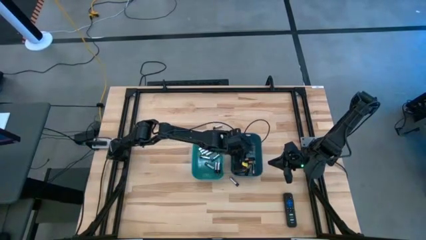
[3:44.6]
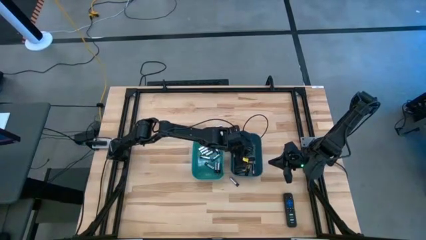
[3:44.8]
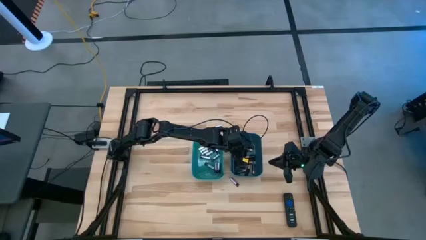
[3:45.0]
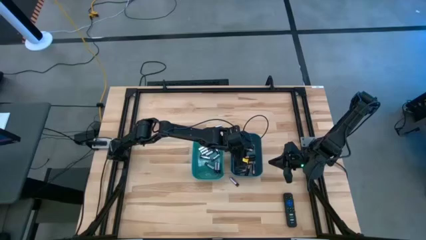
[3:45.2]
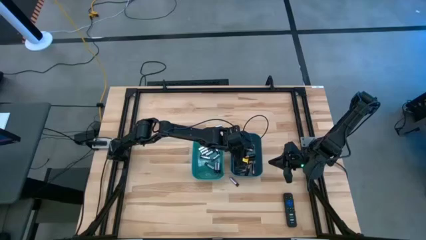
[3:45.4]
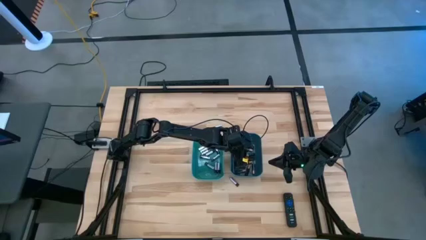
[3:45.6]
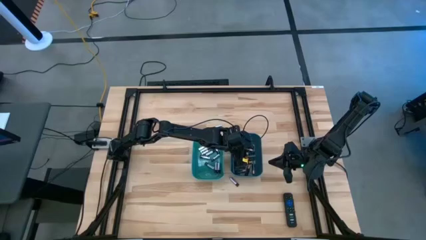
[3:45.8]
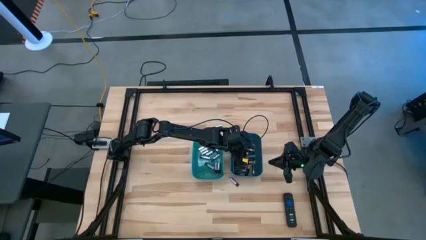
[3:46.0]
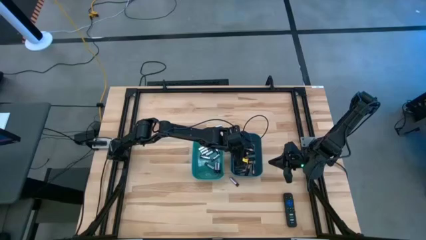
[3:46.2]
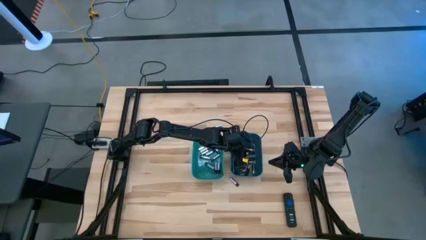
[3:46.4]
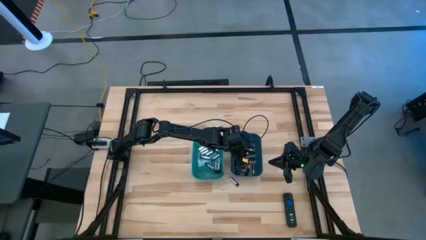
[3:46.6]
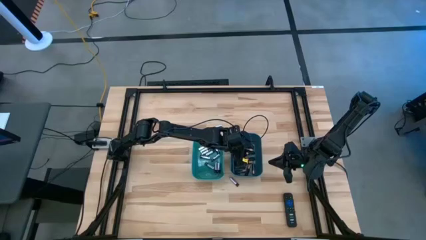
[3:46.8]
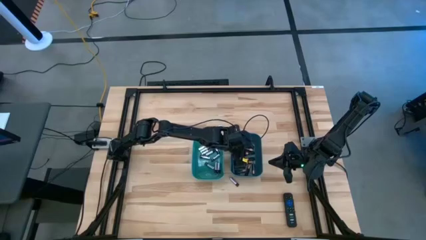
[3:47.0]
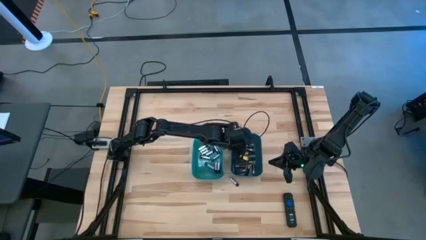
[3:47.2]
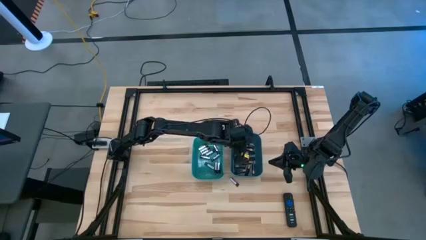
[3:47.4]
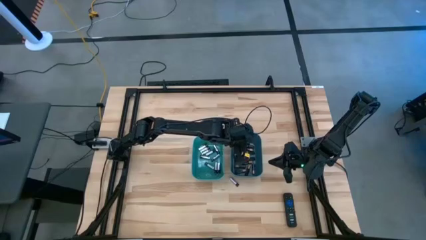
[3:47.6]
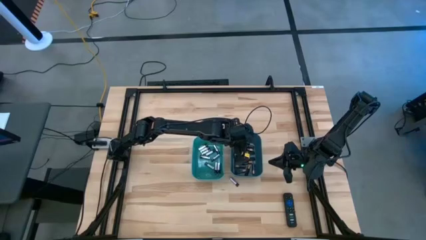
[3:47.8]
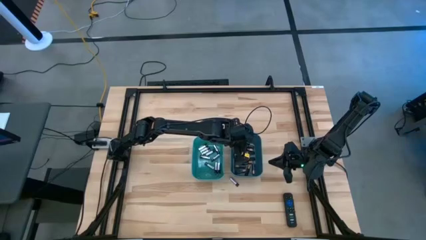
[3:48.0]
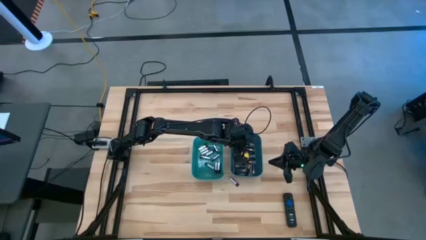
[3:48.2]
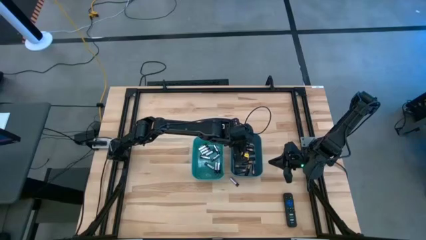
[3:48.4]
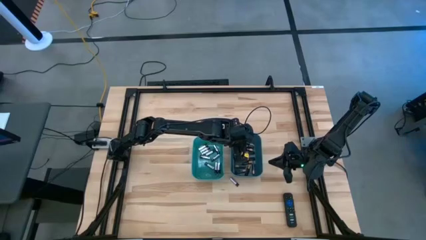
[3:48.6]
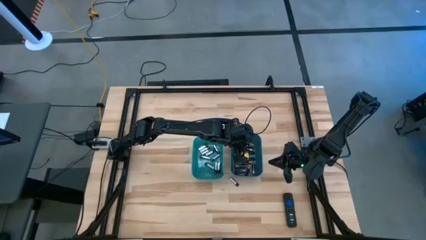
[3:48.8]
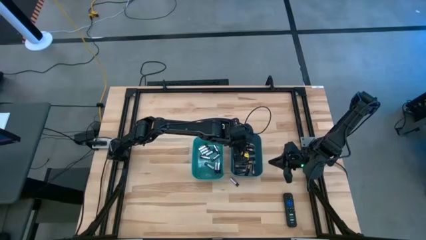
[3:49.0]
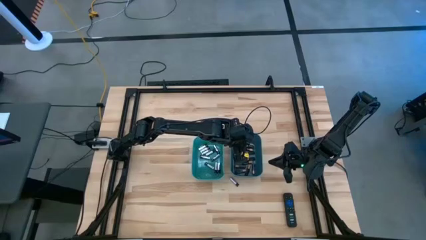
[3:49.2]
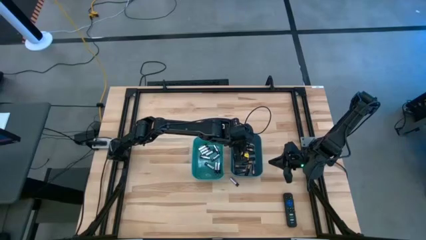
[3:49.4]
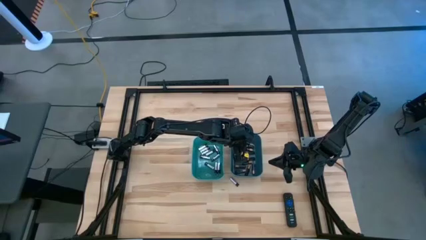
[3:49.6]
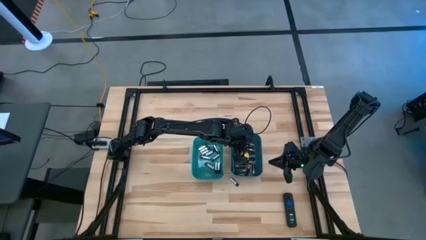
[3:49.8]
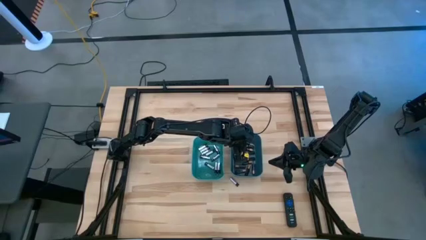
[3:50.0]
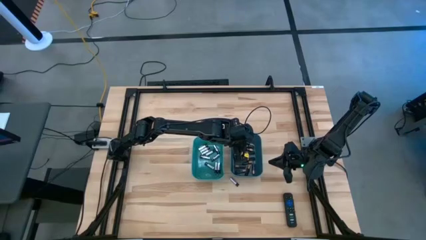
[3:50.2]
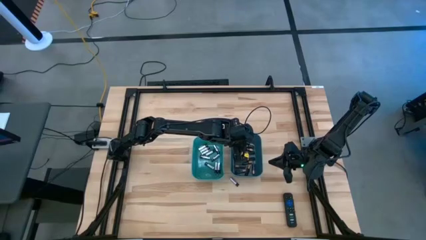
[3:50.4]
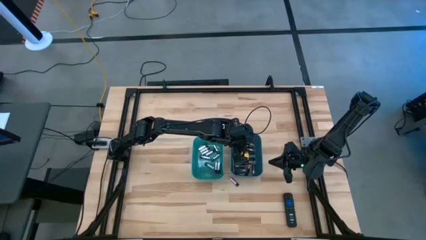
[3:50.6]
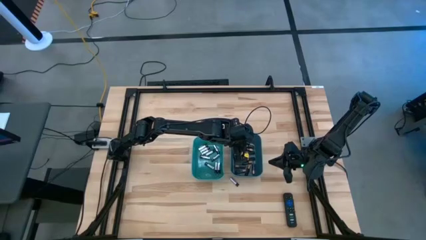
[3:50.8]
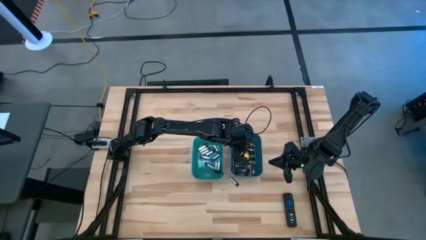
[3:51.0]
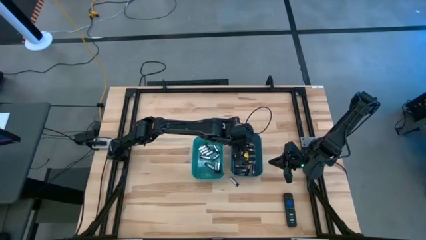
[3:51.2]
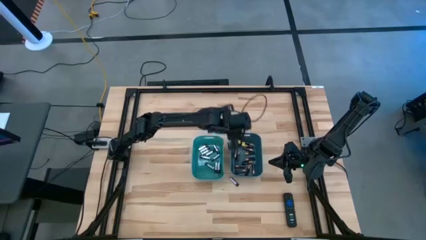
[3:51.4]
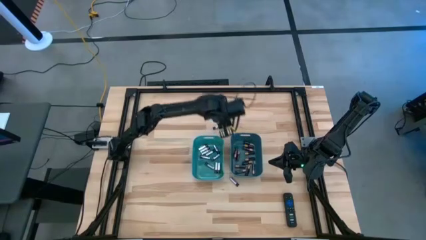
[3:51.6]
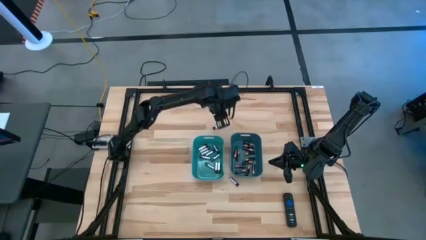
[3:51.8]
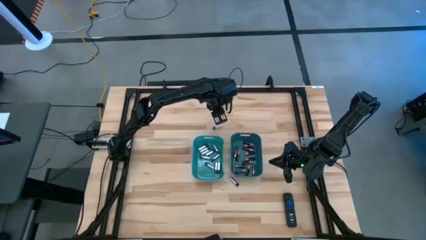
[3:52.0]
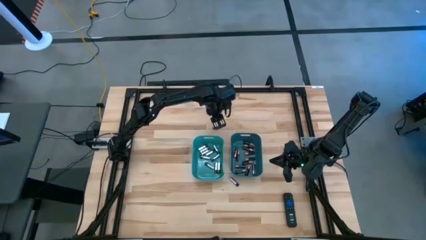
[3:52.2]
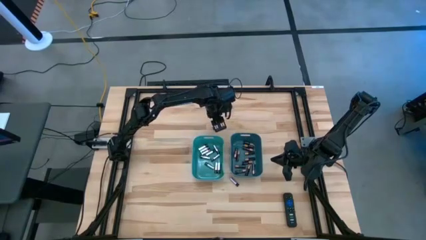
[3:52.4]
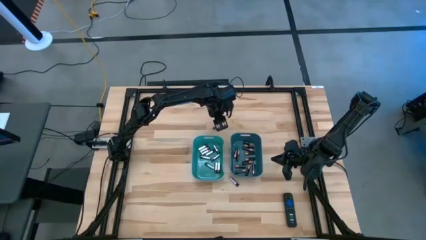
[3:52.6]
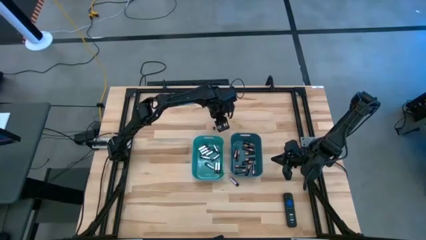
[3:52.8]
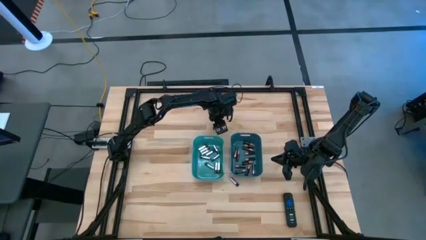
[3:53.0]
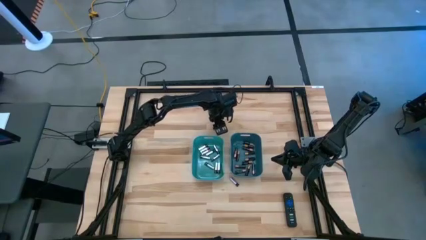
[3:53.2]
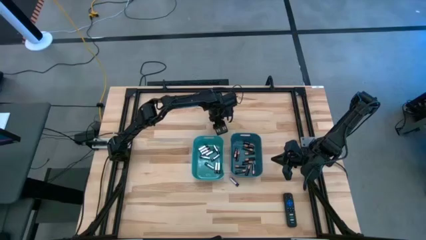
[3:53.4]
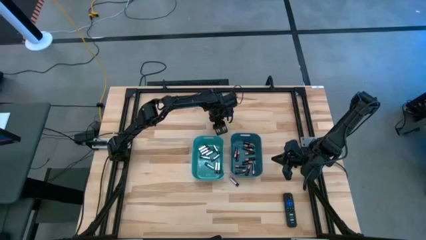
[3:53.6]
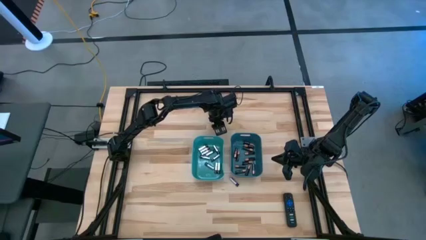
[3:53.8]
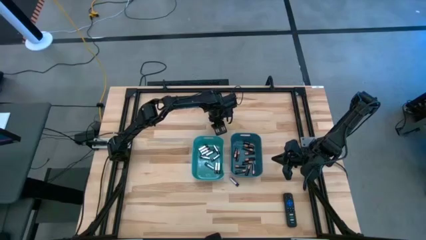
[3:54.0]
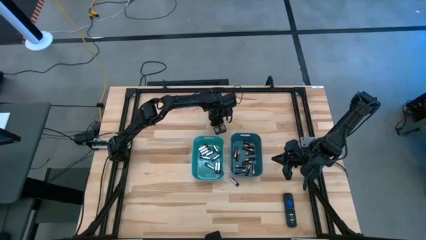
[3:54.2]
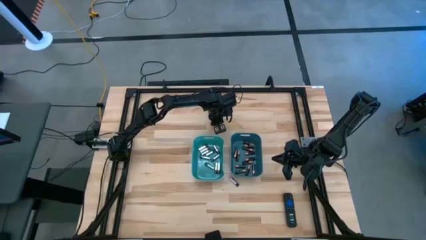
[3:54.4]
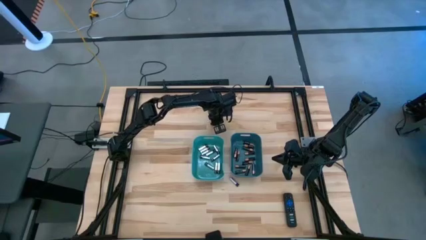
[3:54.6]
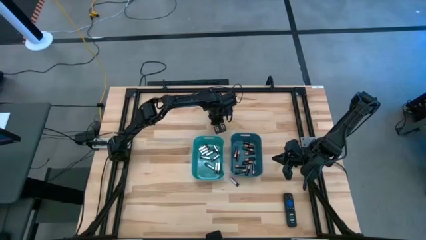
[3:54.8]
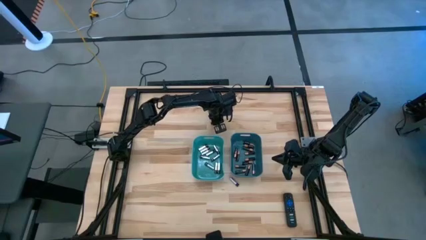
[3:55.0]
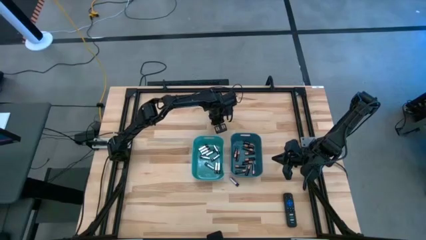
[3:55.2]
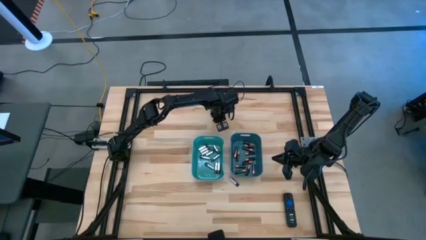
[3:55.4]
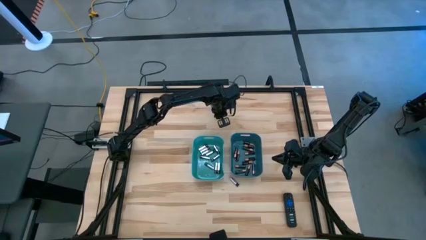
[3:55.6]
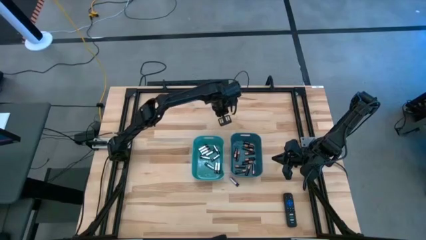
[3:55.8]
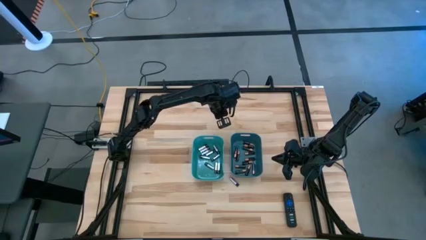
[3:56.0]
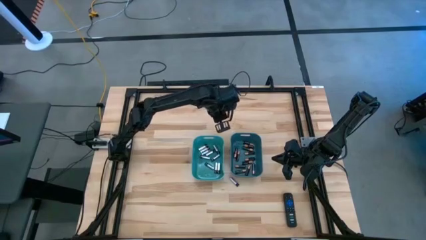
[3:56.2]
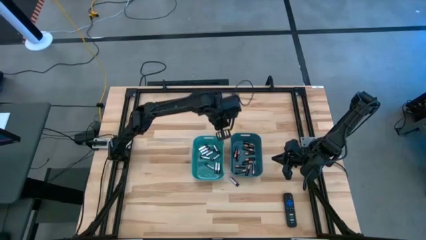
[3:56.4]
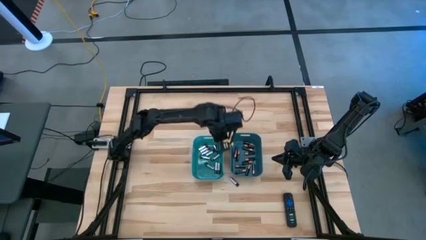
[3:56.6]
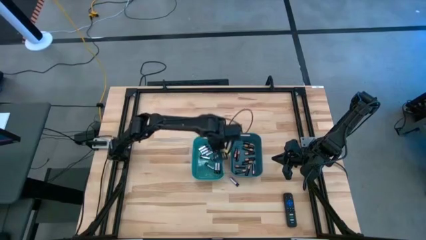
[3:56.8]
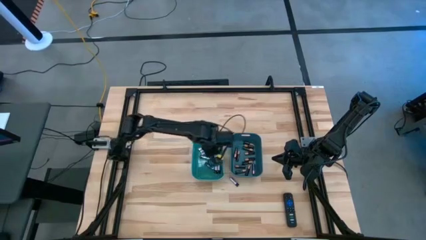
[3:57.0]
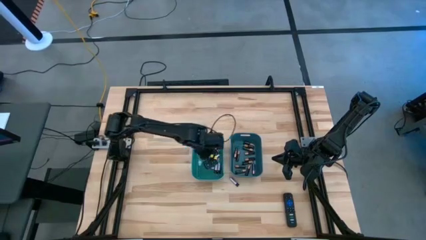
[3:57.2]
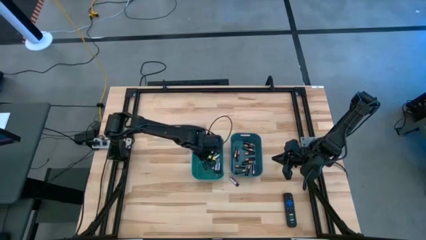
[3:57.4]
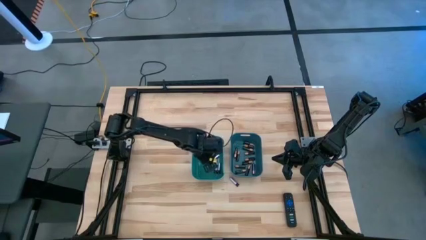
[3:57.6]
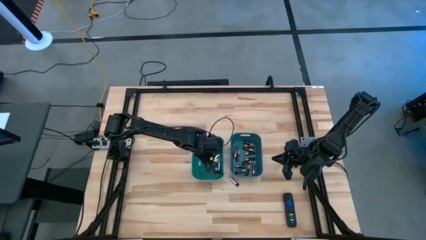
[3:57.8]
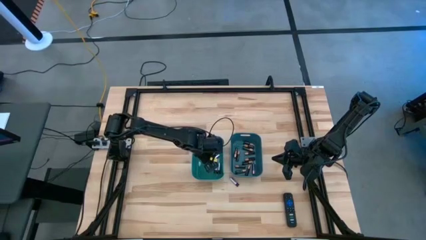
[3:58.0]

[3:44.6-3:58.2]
Task: Sort batteries
Put the silver battery into the green bin
